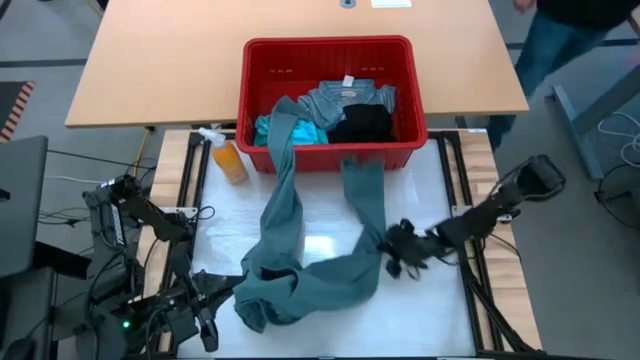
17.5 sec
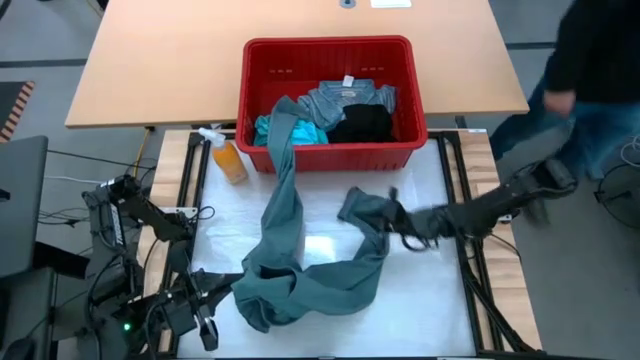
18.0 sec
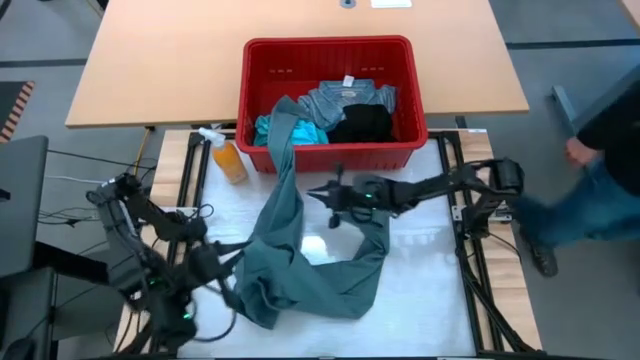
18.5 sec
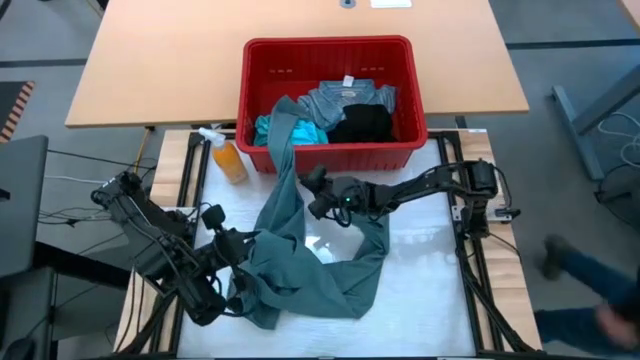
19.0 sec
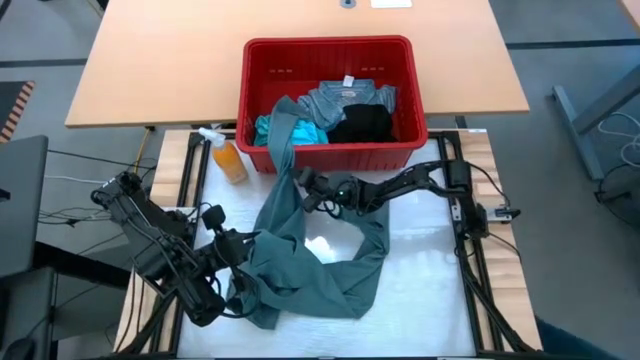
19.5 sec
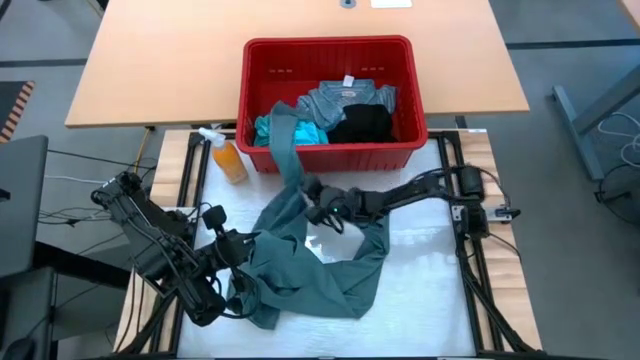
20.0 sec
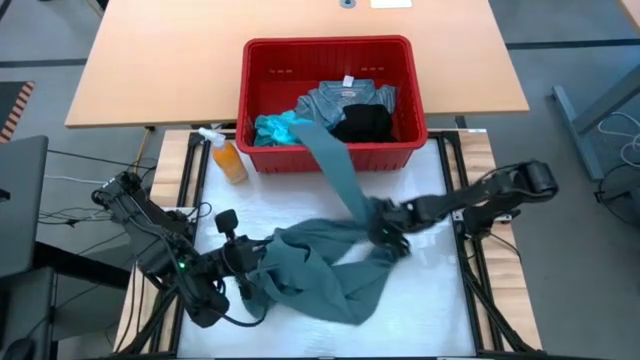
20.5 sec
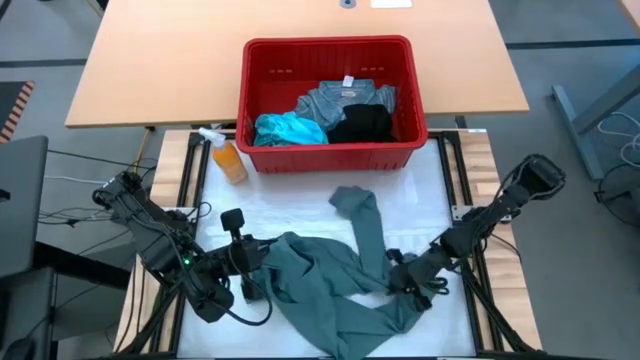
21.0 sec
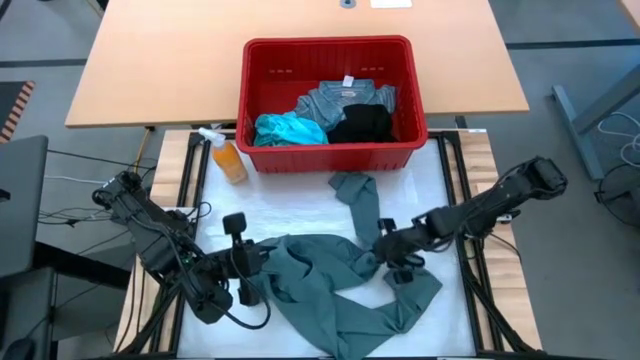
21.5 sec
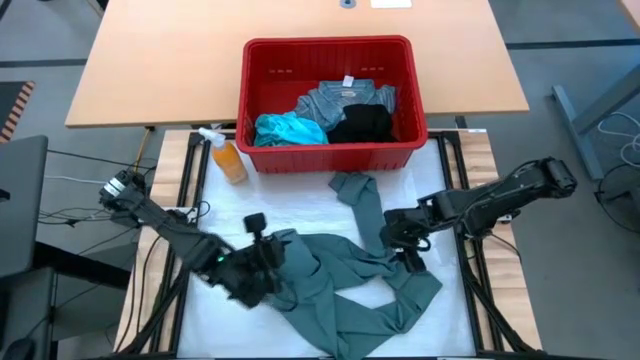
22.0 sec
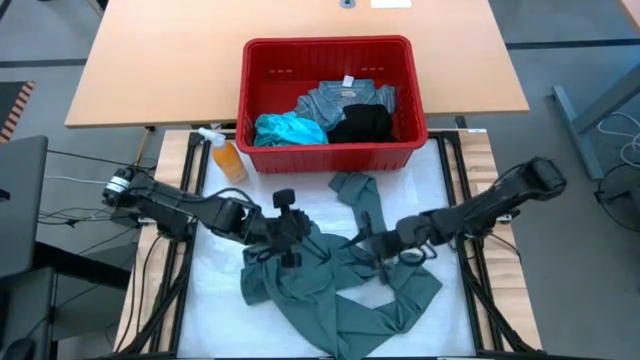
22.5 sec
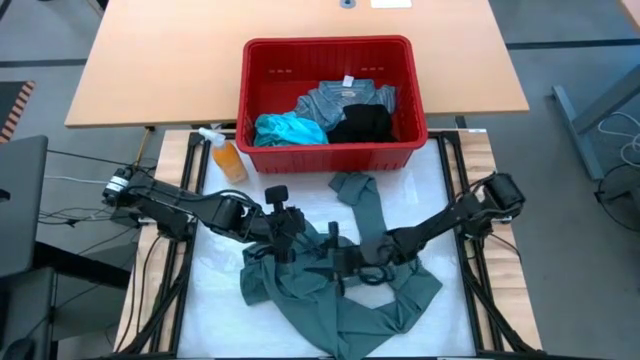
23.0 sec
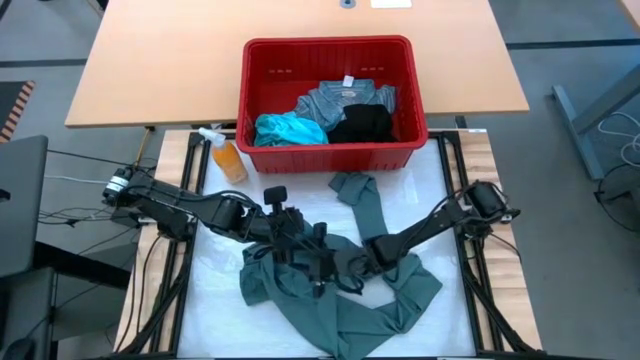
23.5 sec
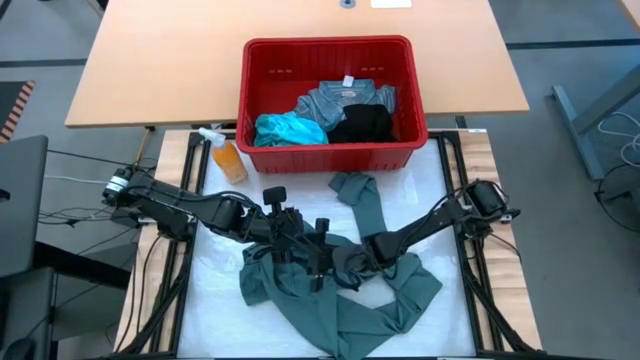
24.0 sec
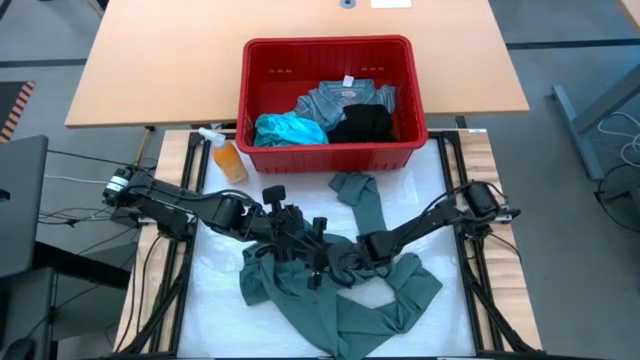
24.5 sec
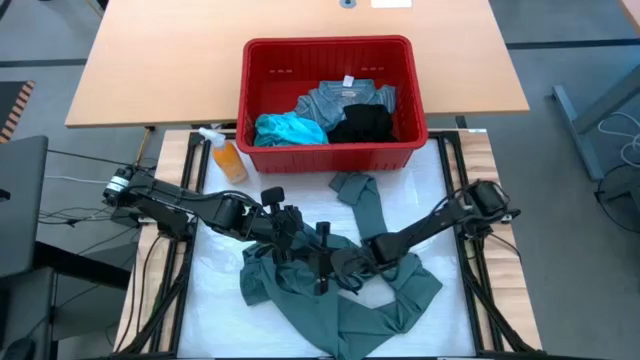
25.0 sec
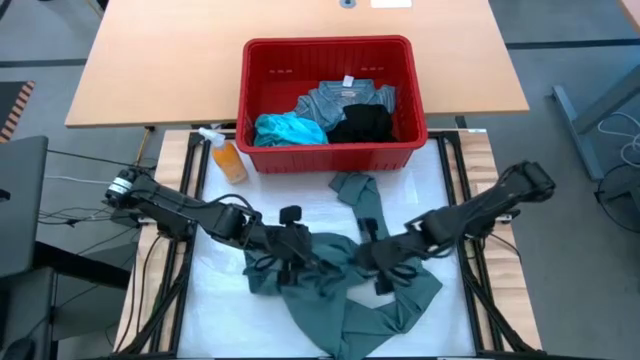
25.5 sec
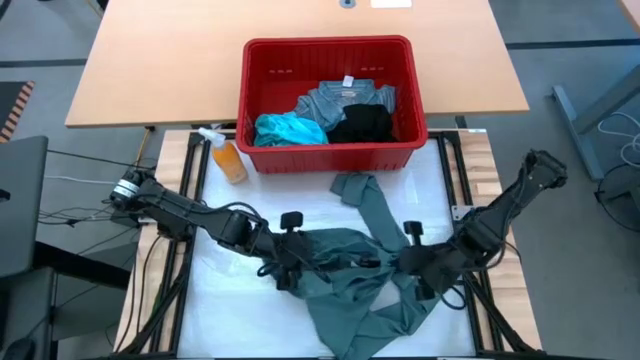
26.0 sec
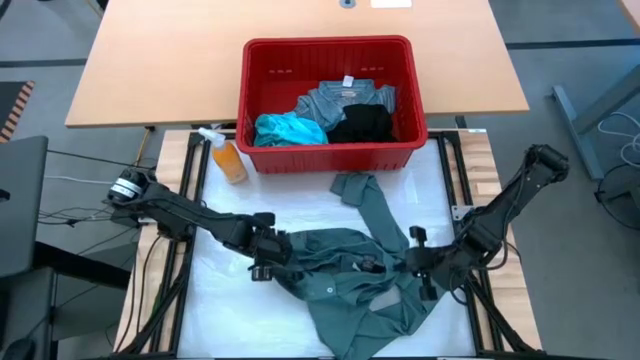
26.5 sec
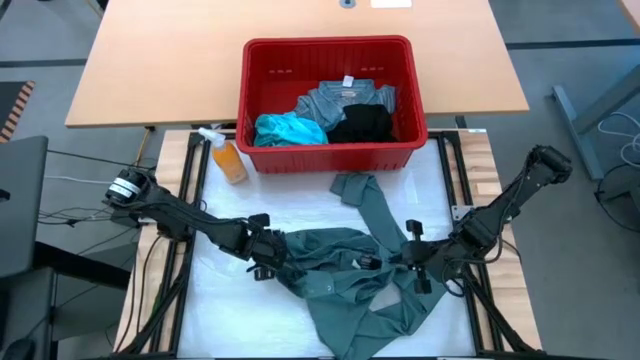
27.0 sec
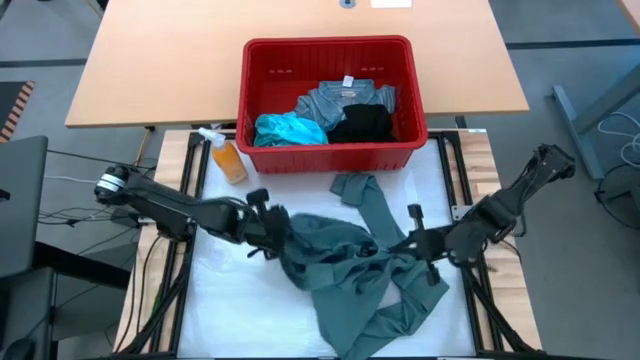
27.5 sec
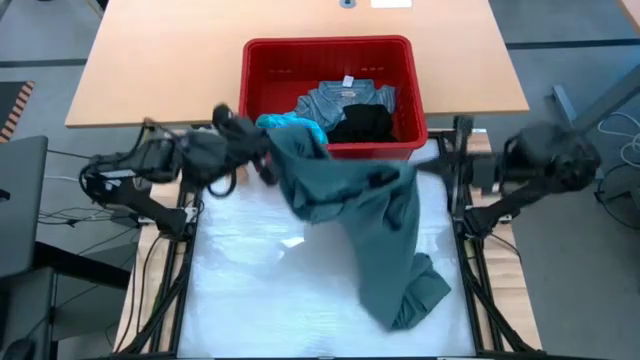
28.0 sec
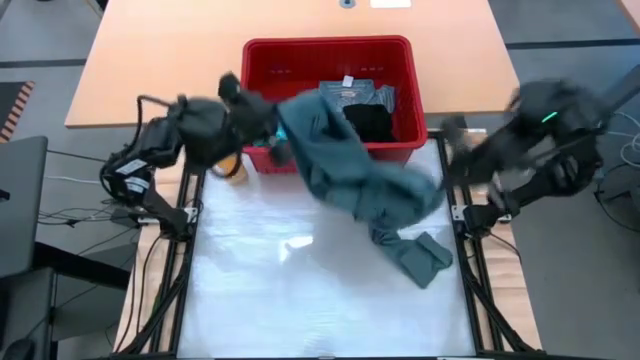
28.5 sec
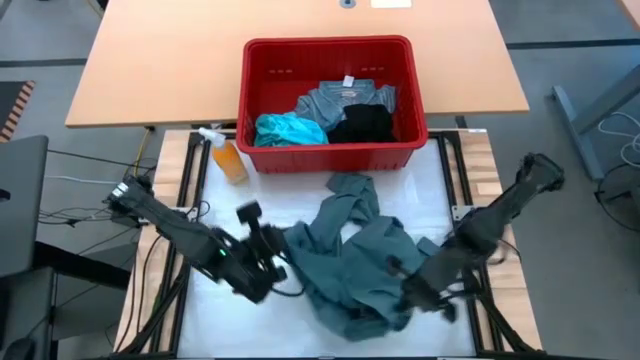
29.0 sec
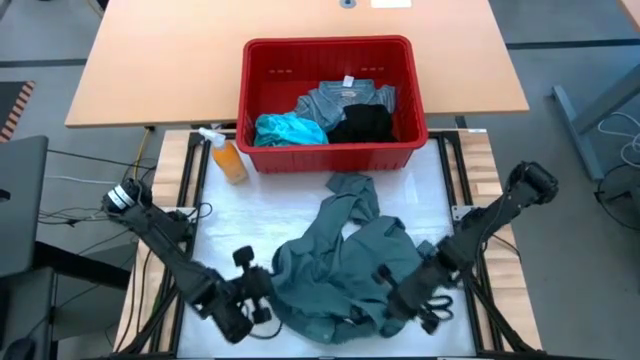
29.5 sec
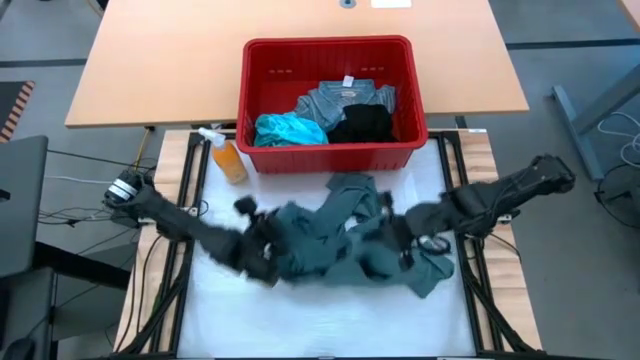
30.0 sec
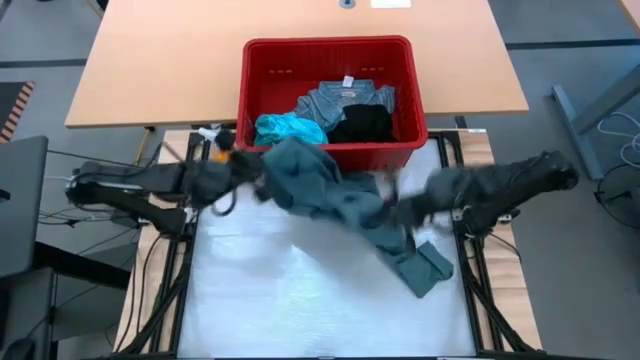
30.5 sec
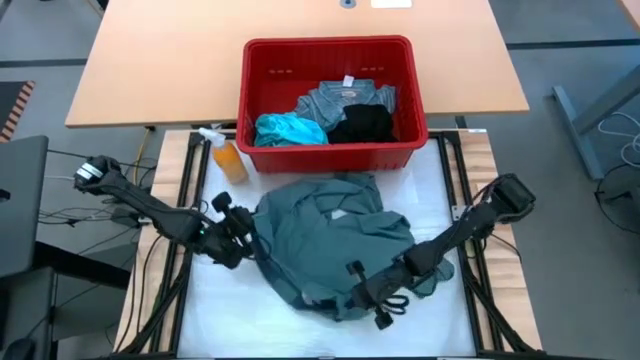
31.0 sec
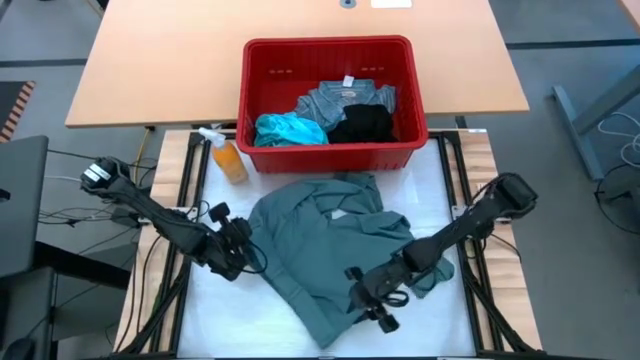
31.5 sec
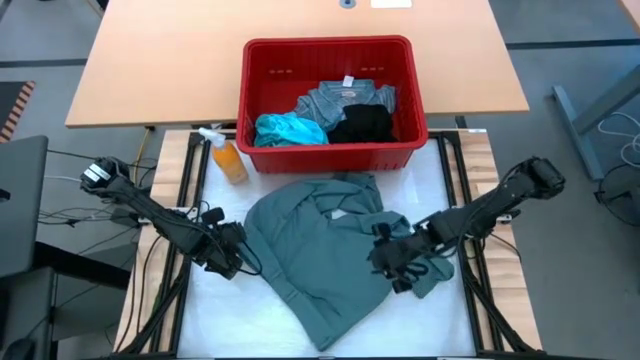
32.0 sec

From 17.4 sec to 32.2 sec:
Task: Fold Laundry from Bin
Remove the gray pants from the red bin on the table

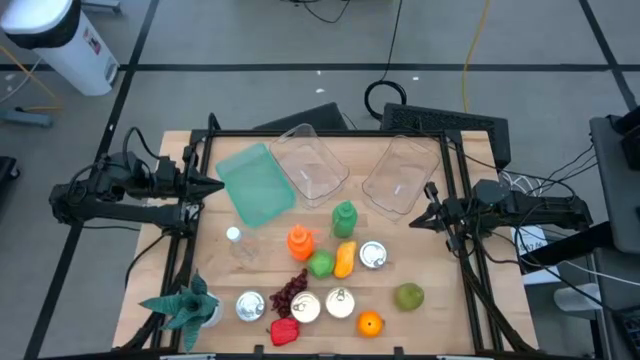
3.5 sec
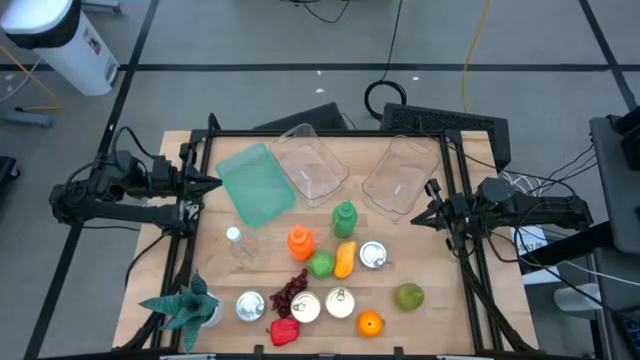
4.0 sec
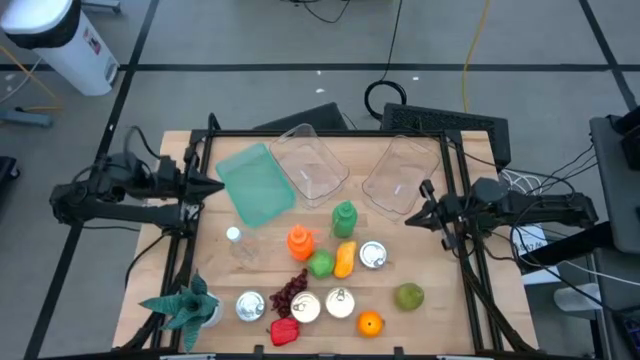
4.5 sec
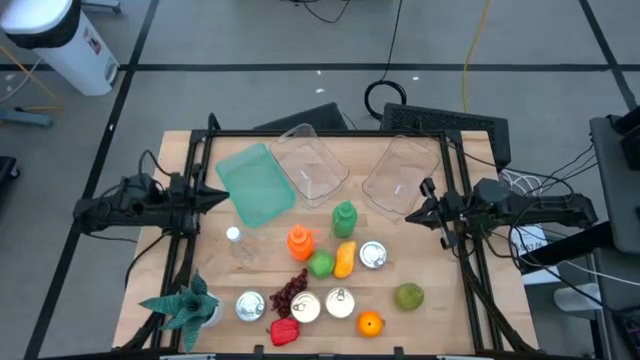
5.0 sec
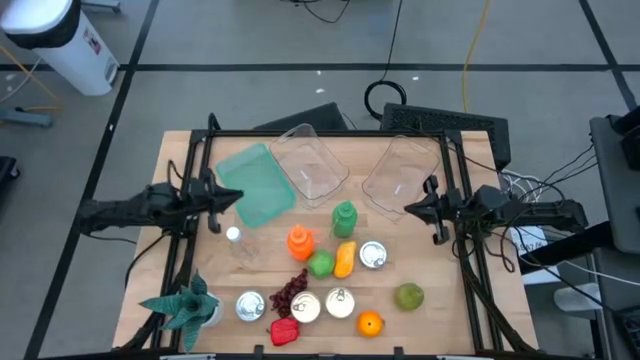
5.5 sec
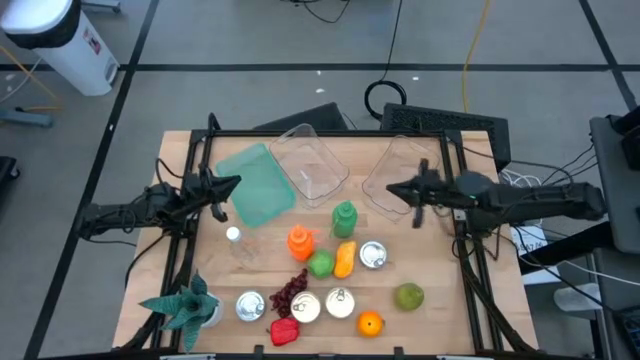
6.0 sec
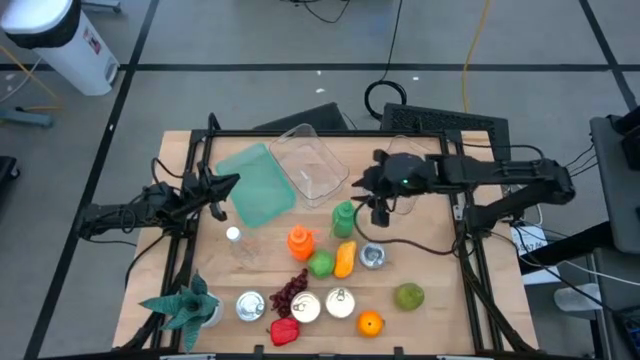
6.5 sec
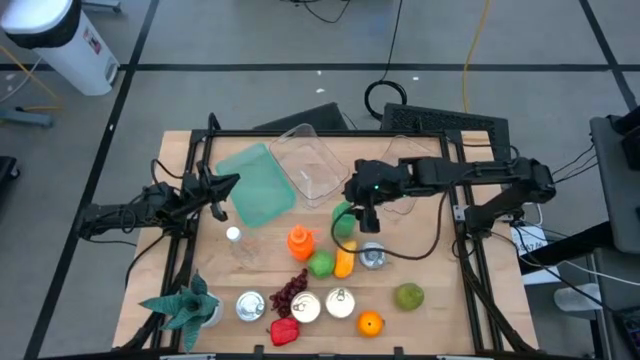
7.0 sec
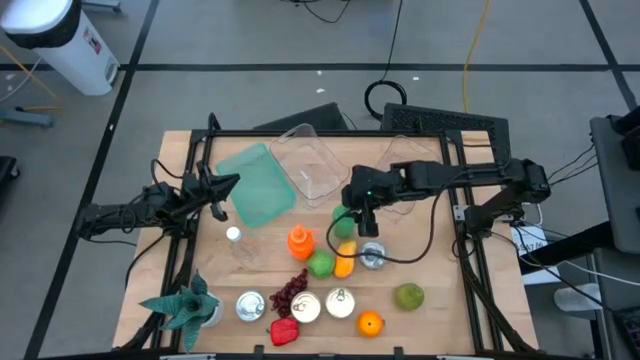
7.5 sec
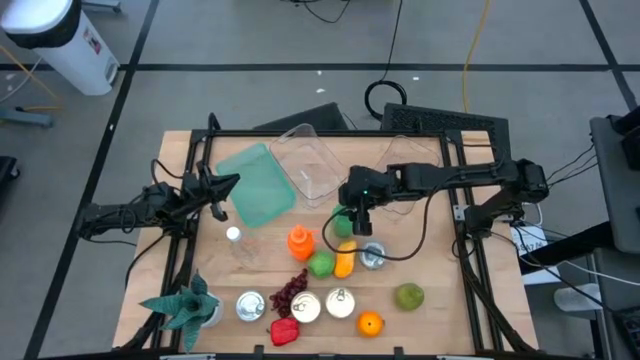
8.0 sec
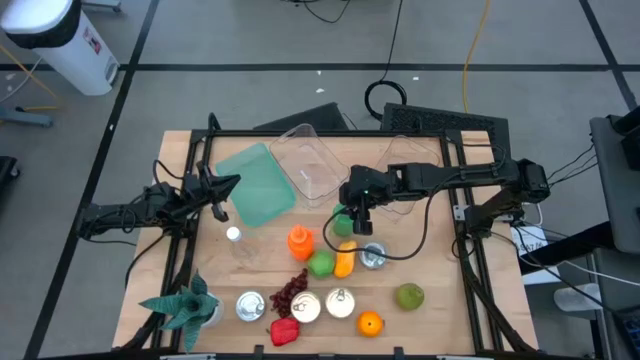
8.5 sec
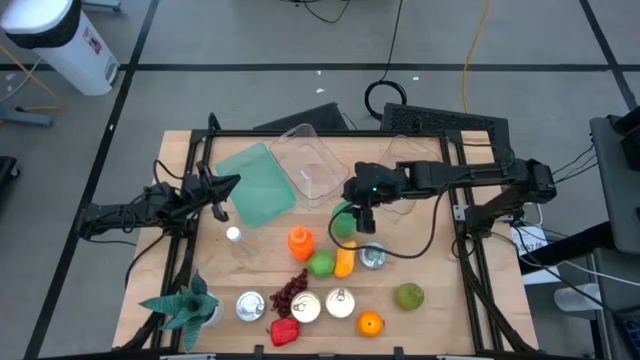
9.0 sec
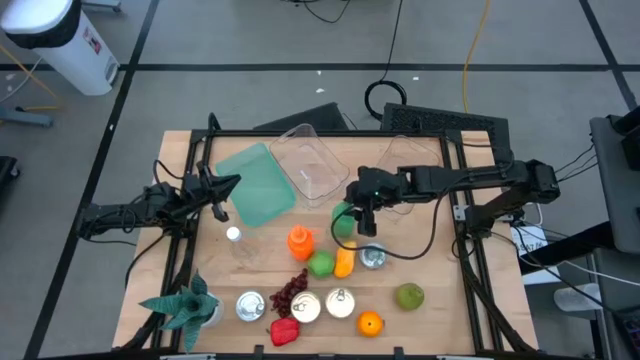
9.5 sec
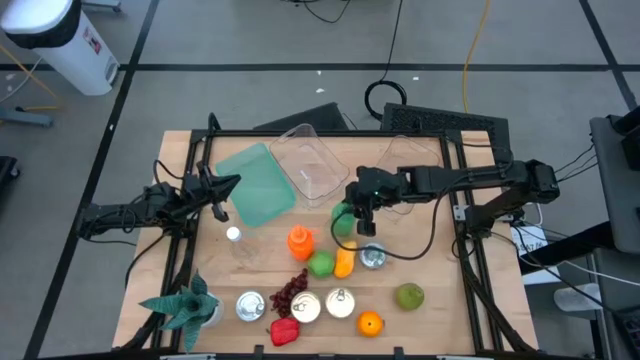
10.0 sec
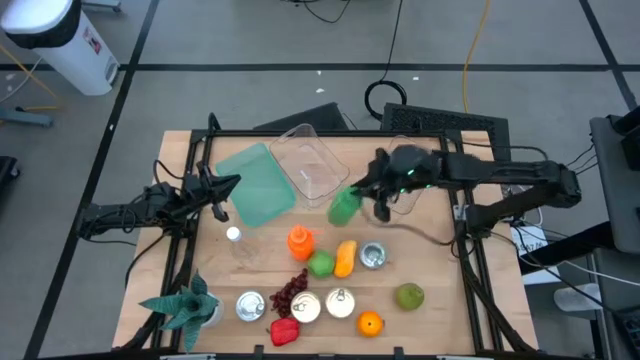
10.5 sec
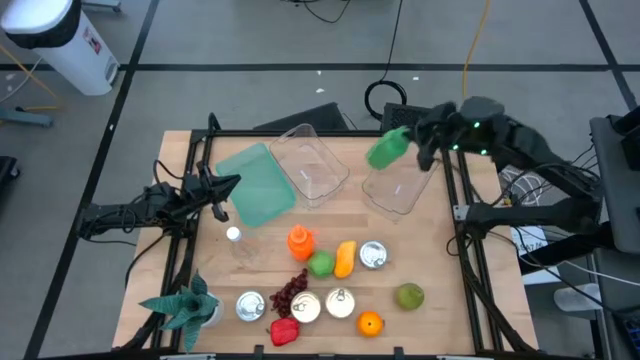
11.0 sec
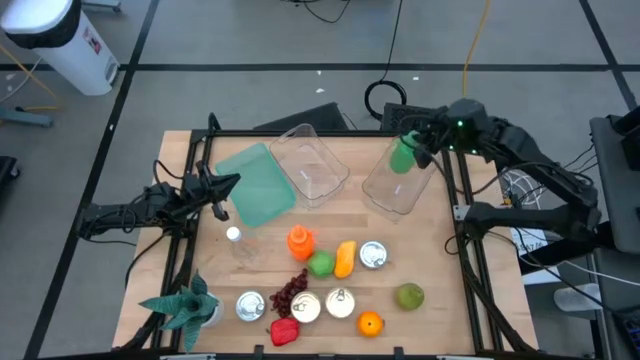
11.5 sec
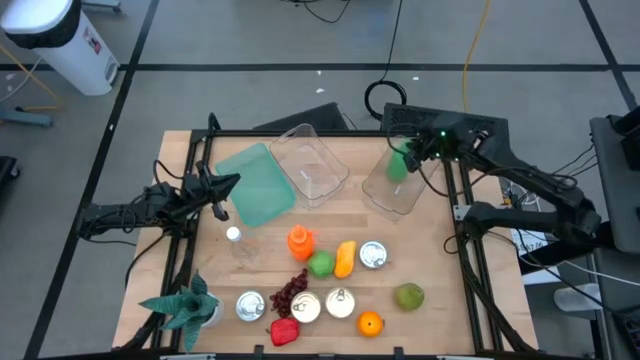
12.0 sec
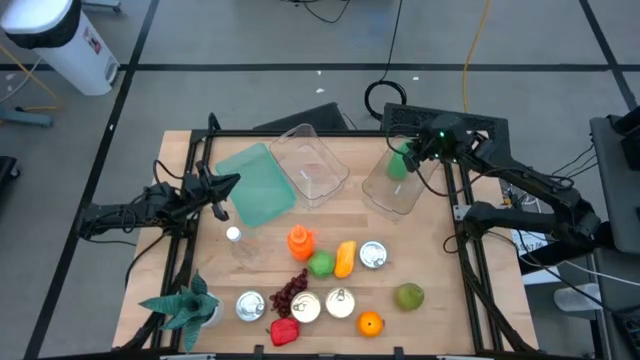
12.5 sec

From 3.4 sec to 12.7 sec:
Task: Pick & Place Food Item
Put the green bottle into the right transparent bin
